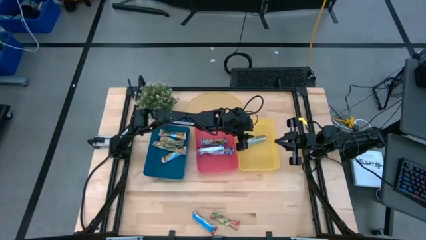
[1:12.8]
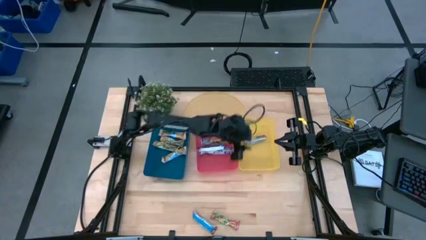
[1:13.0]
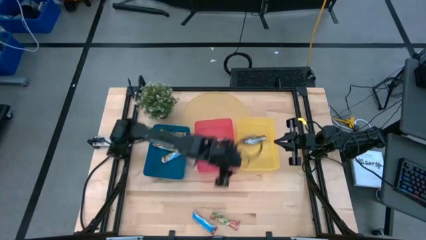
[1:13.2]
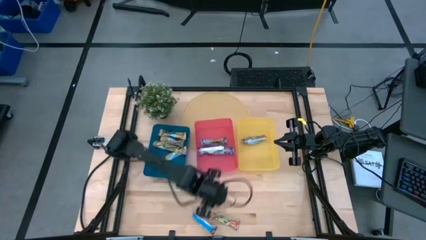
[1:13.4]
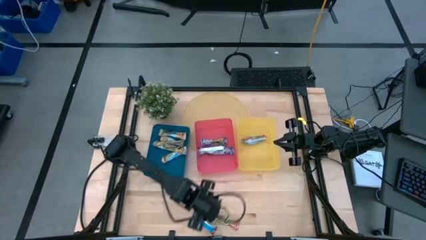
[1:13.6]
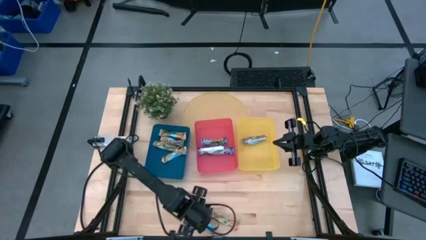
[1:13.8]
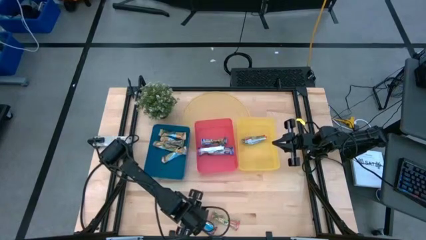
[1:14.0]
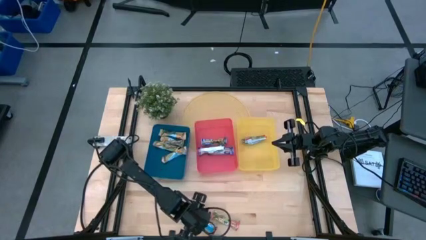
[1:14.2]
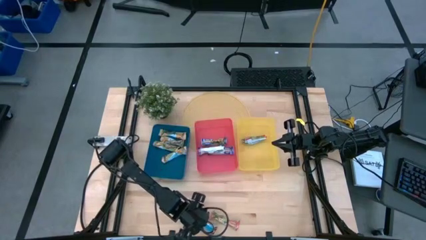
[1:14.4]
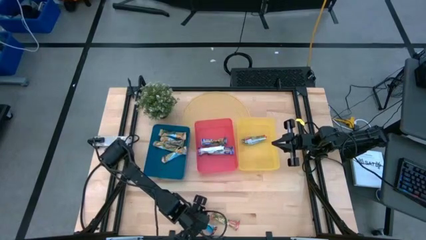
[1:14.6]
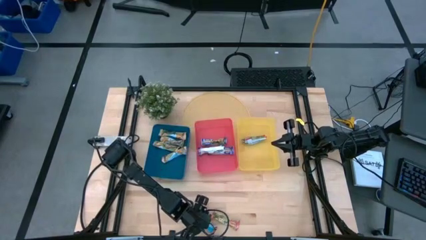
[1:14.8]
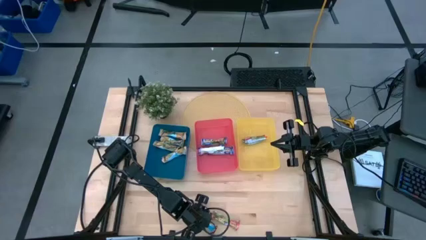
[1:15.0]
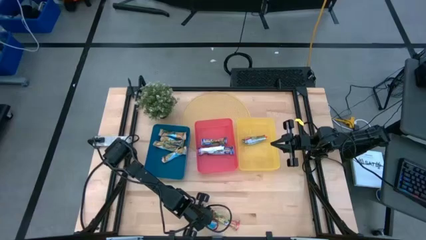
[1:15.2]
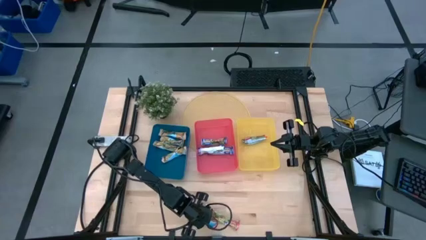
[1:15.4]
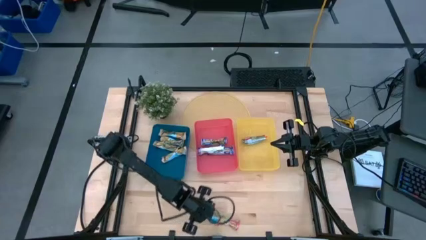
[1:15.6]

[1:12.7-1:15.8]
Task: Pick and place Granola Bars by type
Put the red granola bar into the yellow bin

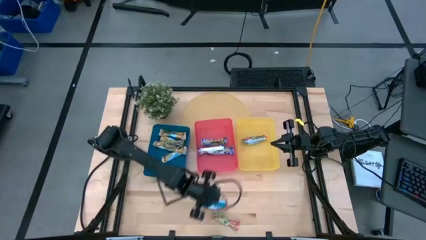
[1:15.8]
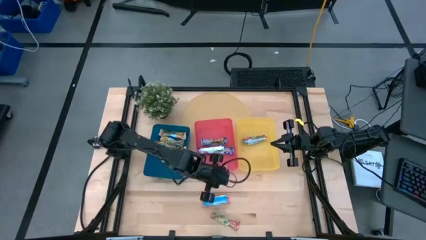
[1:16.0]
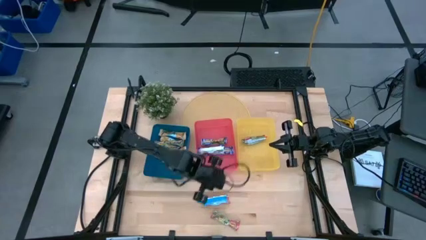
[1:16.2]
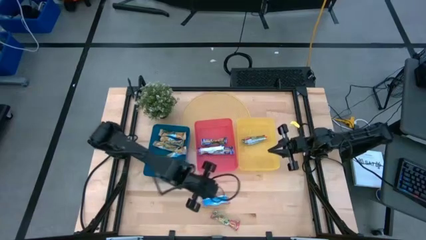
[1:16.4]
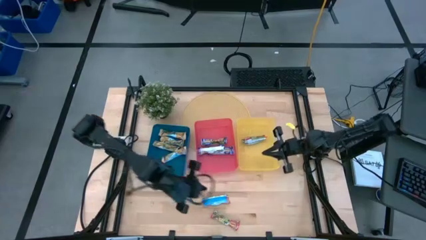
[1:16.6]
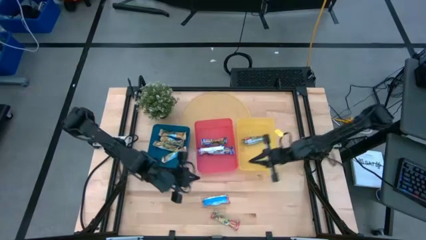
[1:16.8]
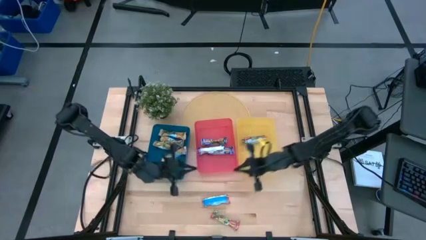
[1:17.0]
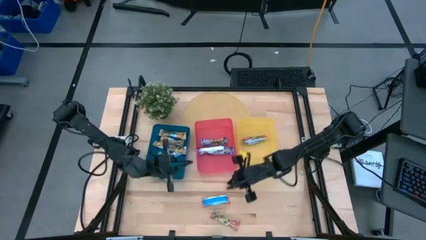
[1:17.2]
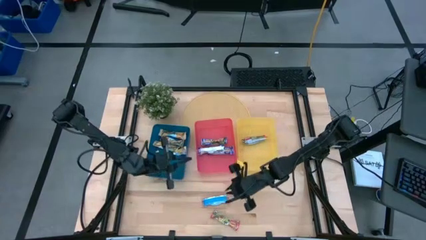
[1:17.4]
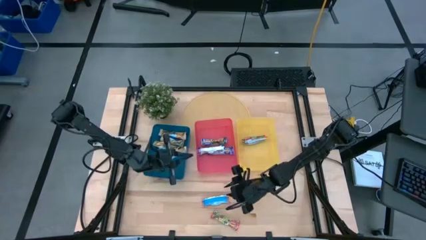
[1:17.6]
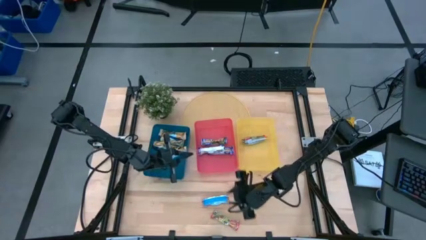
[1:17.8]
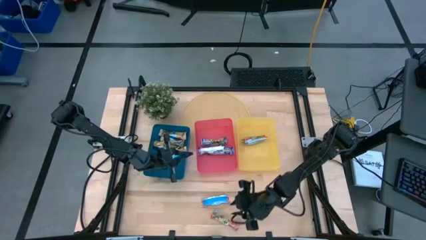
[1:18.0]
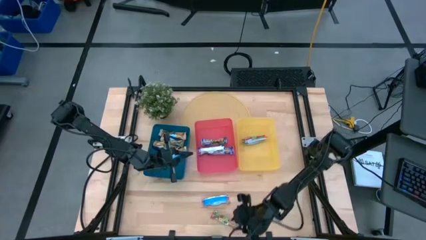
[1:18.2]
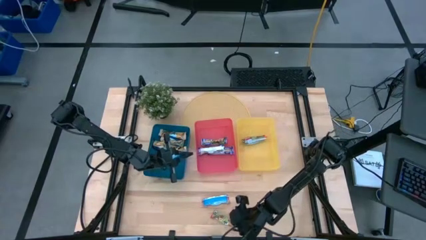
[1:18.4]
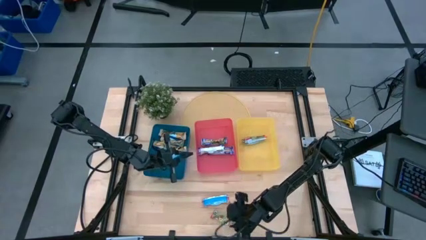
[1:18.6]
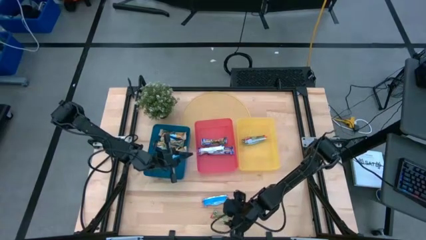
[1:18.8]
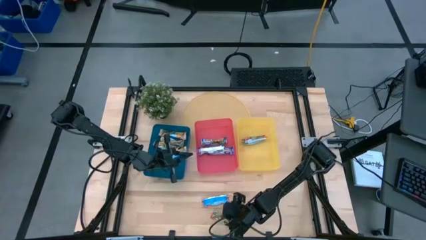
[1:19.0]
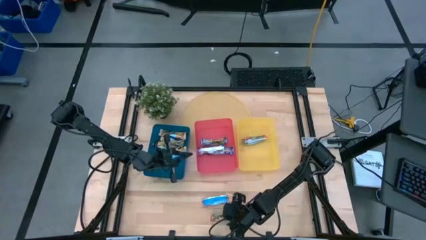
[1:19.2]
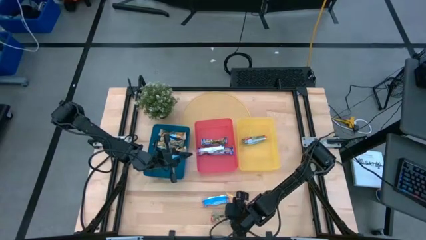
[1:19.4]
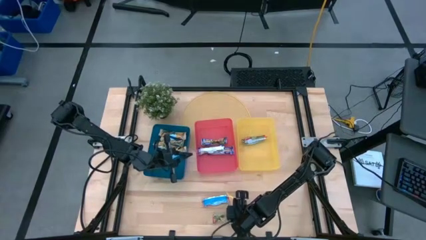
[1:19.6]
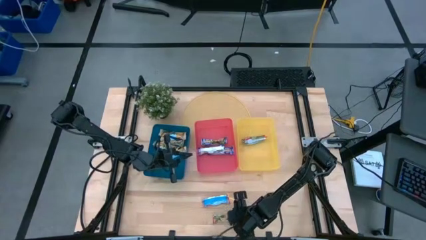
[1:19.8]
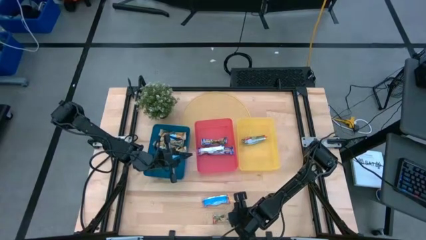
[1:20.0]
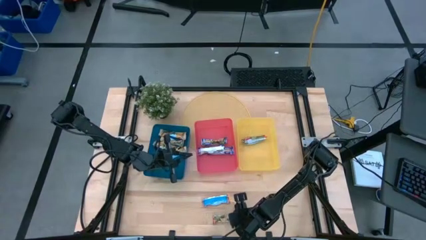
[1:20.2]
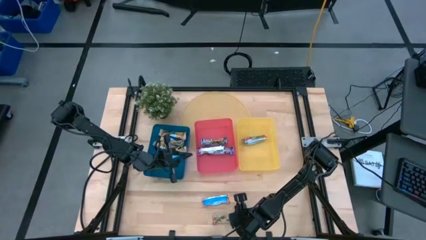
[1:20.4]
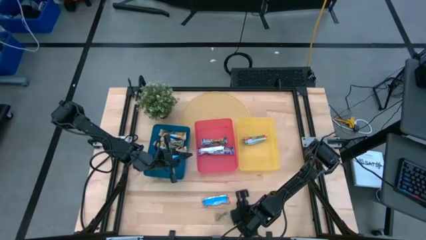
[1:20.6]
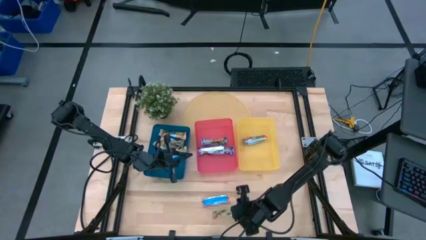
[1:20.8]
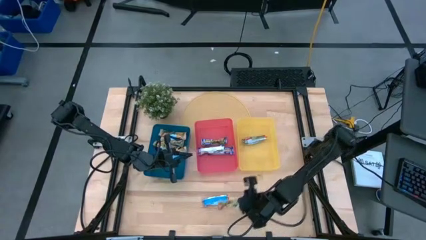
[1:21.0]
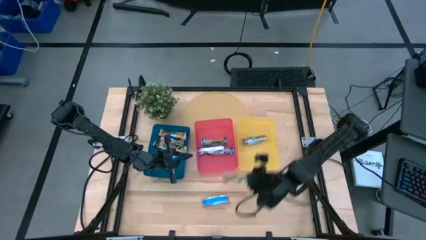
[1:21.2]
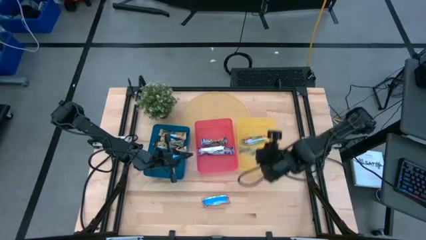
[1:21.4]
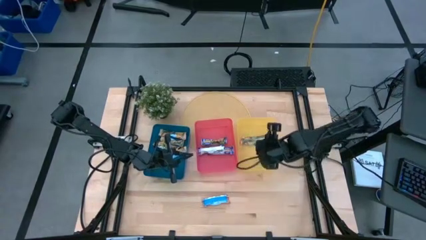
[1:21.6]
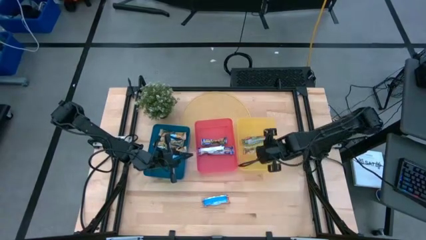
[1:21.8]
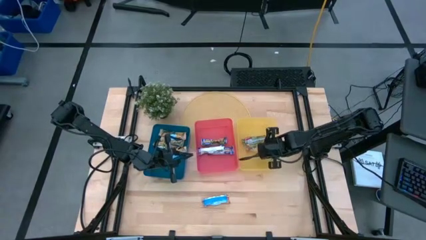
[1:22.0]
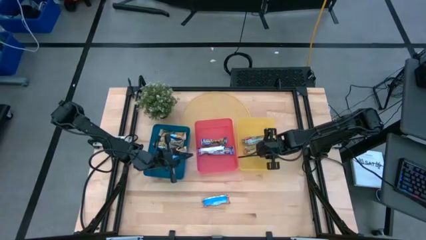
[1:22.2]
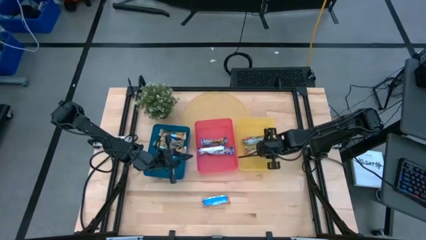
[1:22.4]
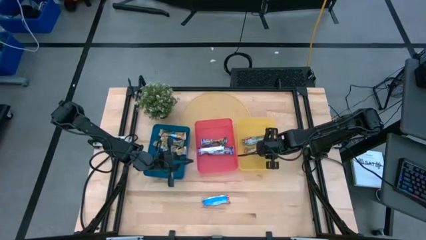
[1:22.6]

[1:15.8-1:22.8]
Put the red granola bar into the yellow bin

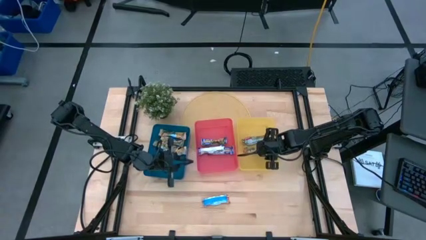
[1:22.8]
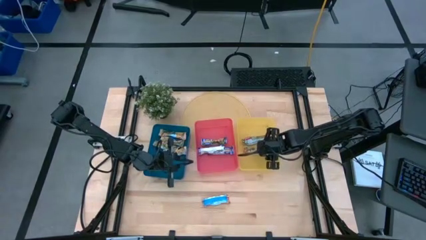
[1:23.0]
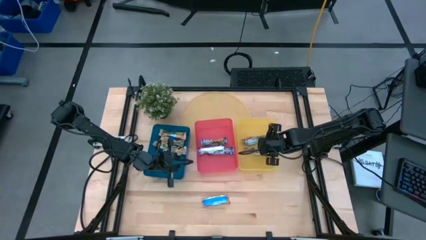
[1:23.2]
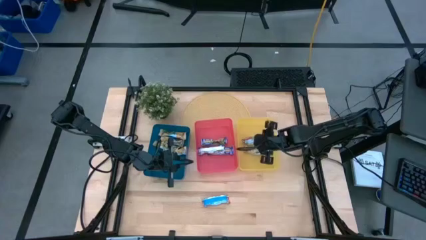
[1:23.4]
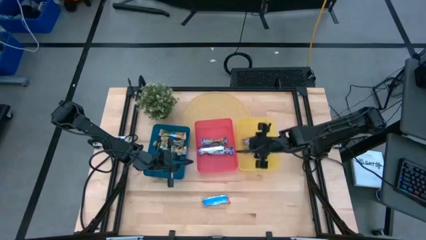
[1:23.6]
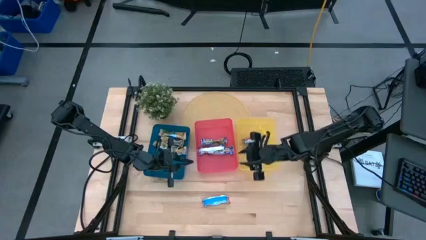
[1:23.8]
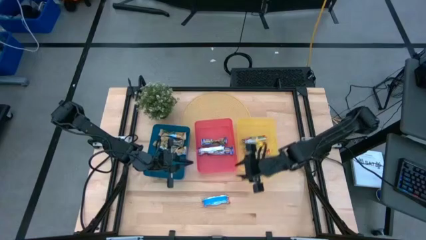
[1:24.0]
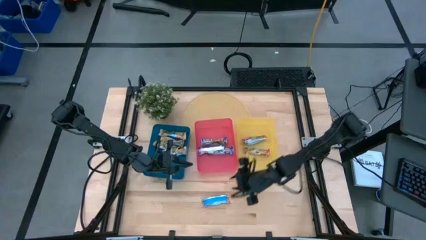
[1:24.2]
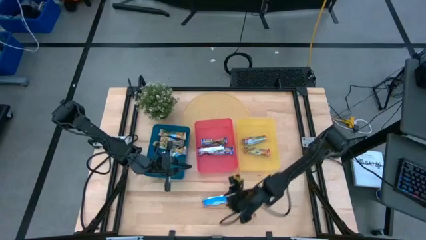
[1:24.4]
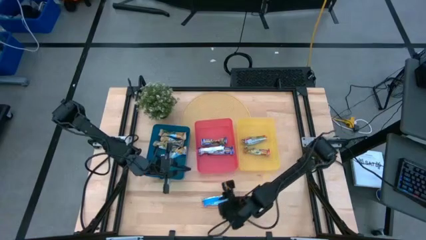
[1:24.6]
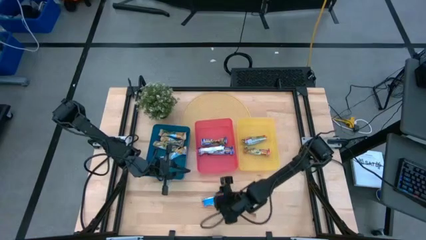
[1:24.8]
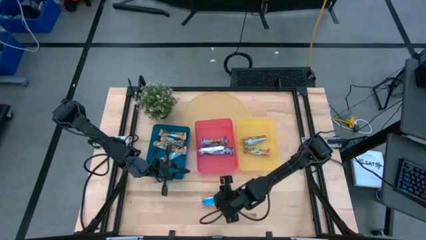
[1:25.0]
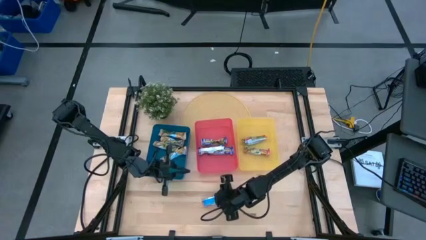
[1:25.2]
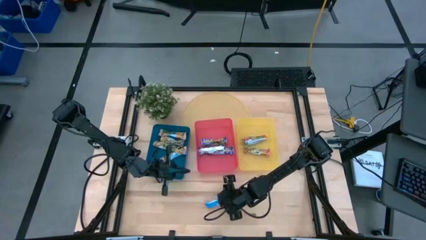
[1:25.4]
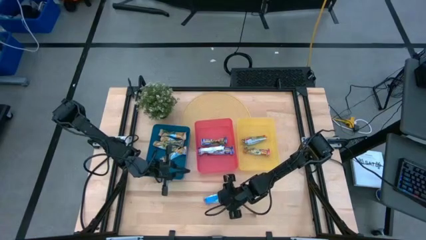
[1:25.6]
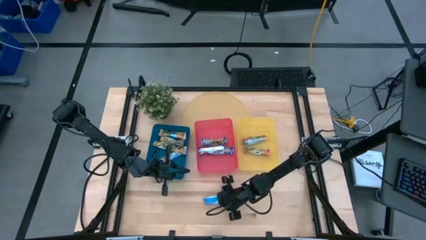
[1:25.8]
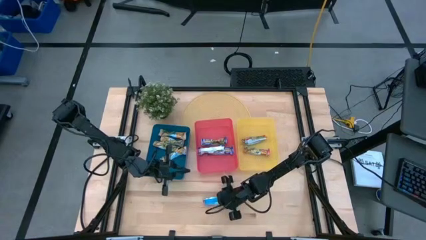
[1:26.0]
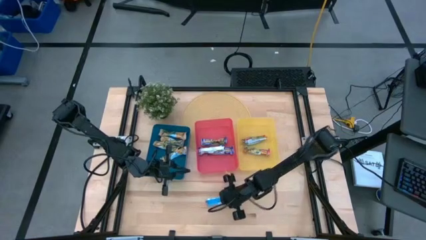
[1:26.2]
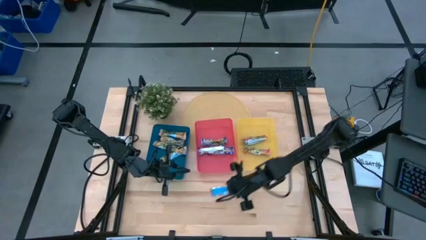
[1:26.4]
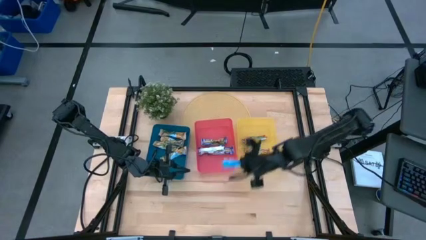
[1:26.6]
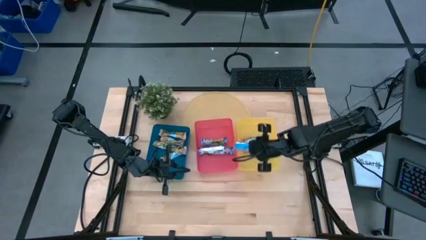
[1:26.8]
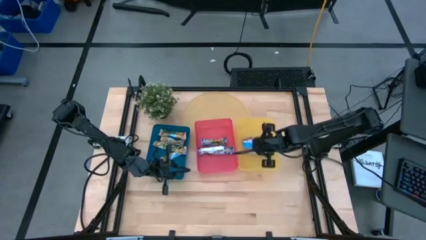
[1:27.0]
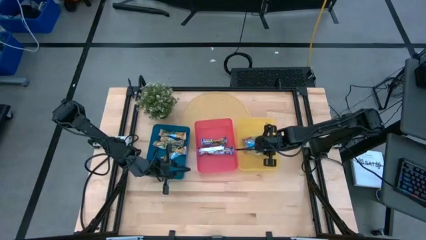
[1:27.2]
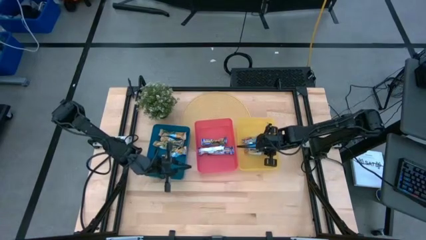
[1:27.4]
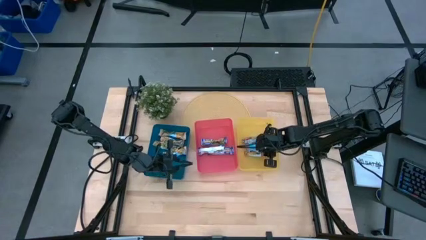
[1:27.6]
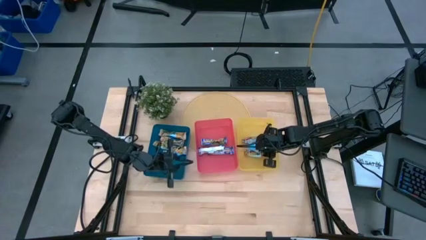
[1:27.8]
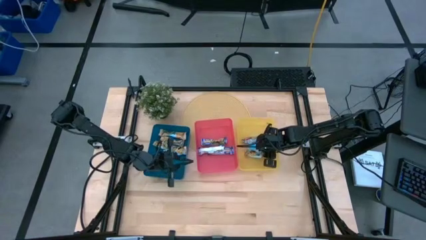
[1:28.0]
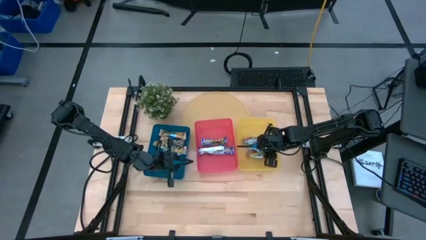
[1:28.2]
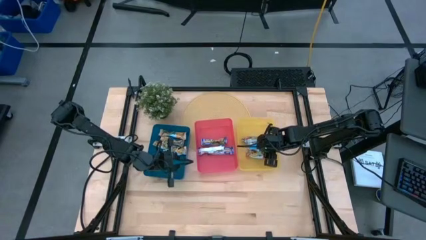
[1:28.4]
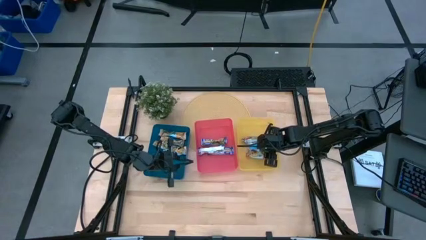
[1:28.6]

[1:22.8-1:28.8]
Put the red granola bar into the yellow bin

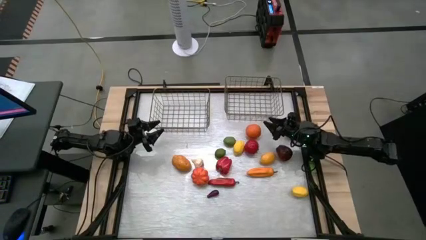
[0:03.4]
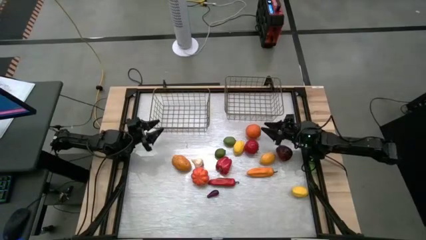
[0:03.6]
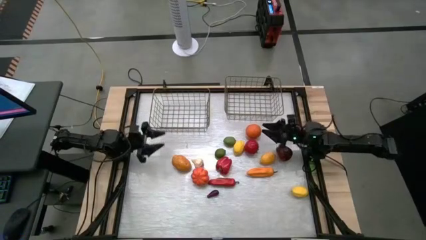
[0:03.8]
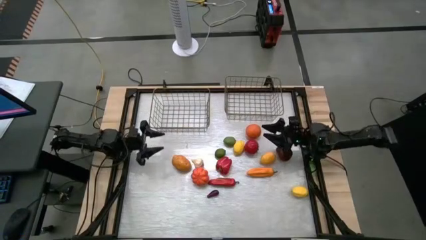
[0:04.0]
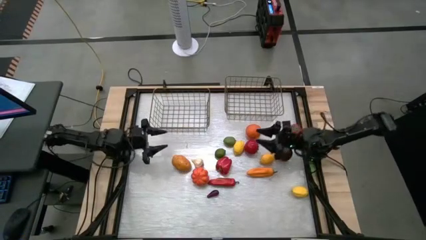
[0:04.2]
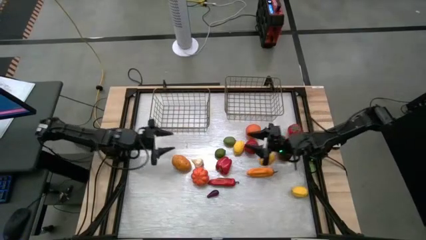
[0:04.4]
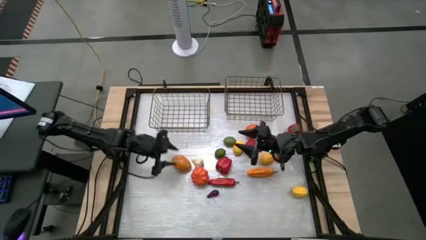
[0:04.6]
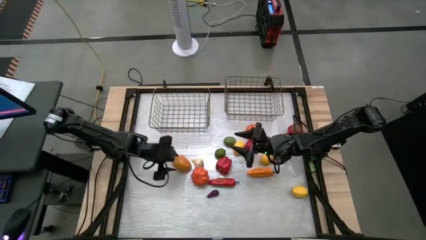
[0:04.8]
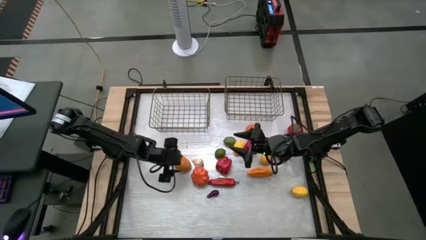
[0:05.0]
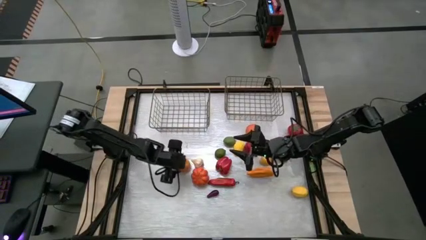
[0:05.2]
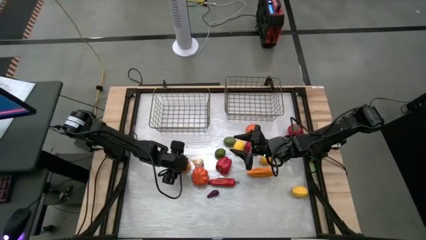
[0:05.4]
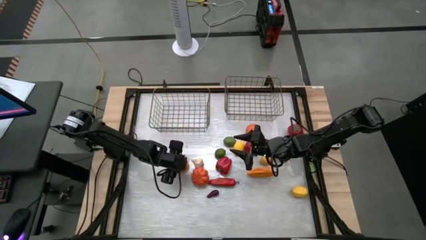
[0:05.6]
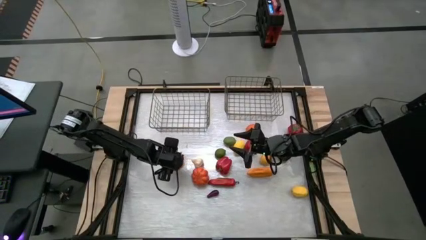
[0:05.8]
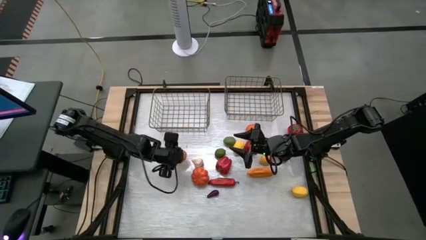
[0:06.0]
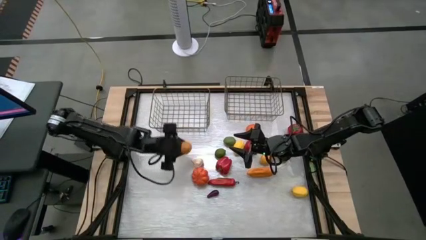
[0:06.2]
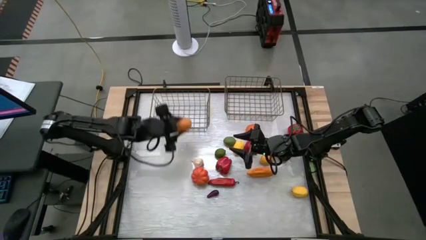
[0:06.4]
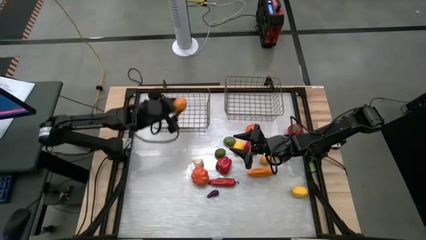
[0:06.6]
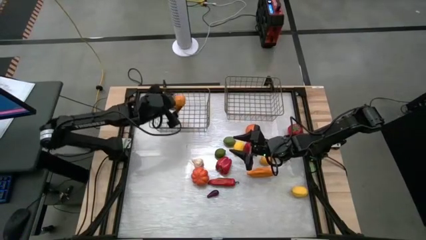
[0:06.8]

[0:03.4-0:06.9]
Task: Sort produce into baskets
Put the potato into the left gold wire basket
